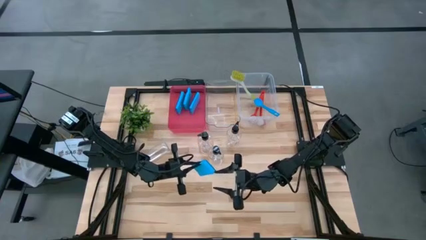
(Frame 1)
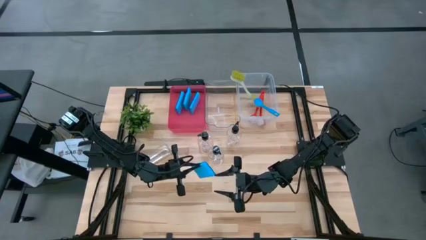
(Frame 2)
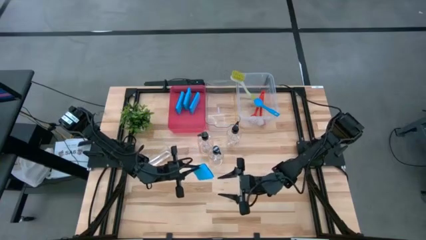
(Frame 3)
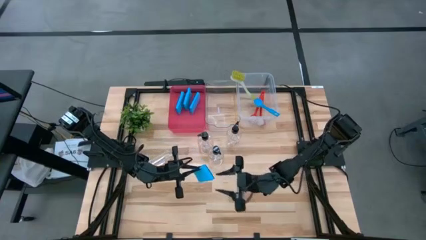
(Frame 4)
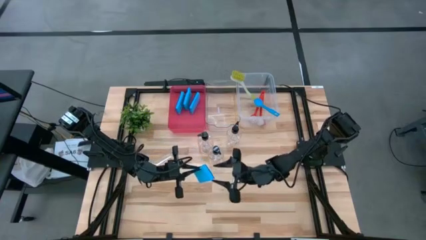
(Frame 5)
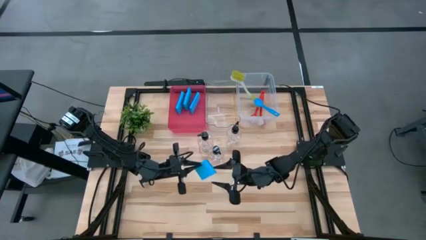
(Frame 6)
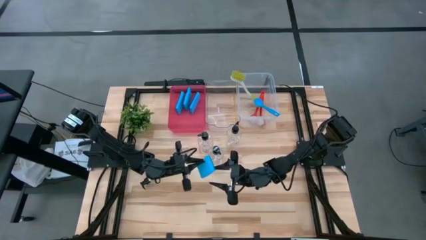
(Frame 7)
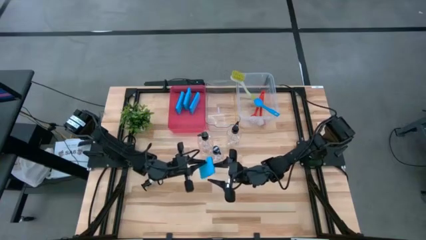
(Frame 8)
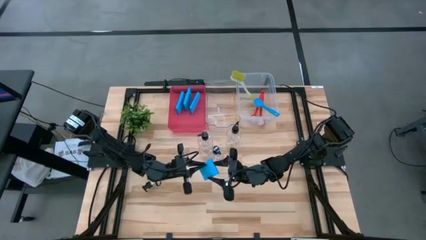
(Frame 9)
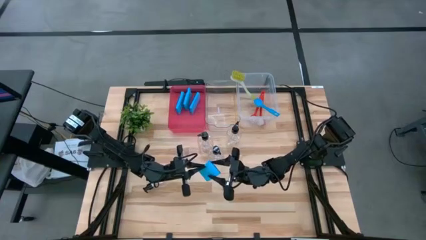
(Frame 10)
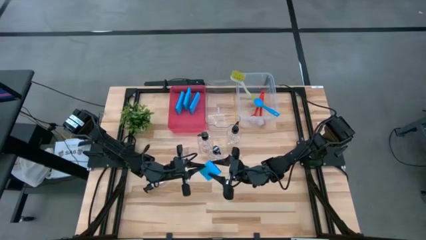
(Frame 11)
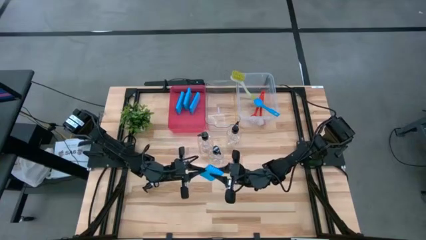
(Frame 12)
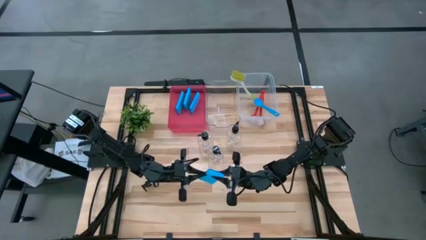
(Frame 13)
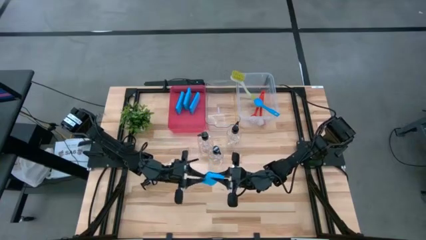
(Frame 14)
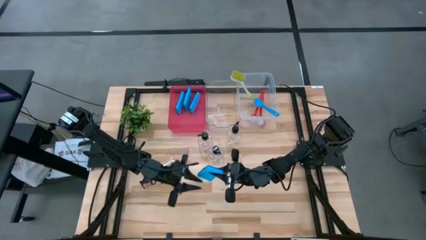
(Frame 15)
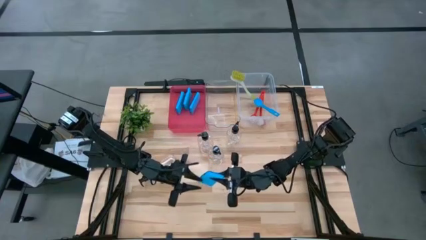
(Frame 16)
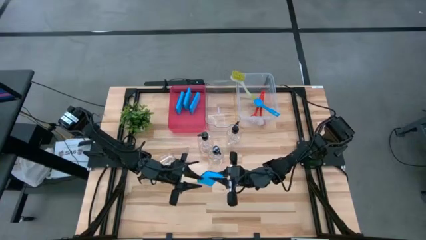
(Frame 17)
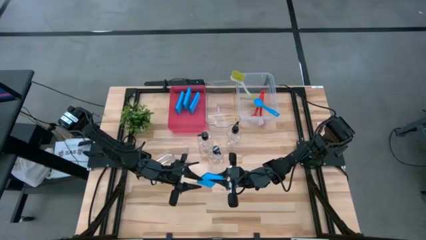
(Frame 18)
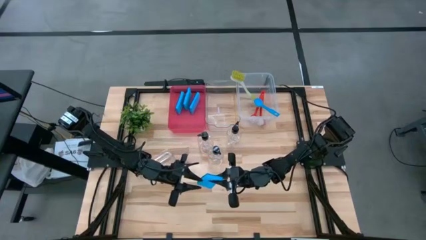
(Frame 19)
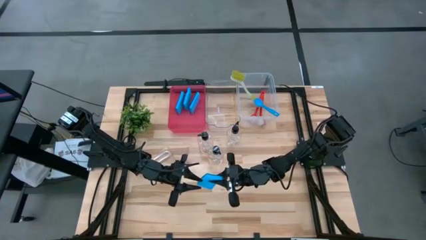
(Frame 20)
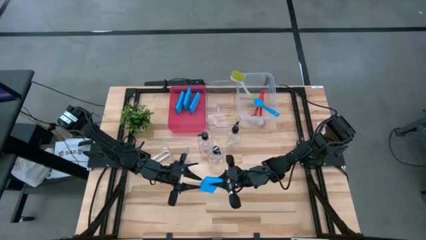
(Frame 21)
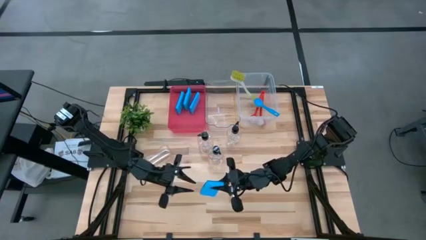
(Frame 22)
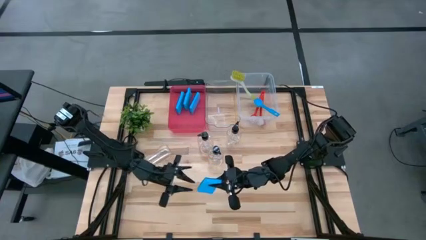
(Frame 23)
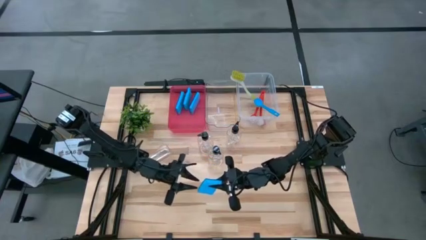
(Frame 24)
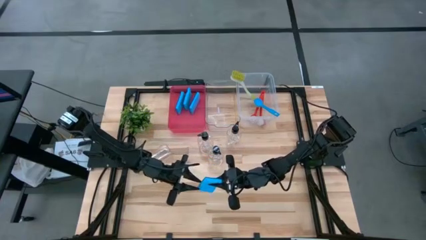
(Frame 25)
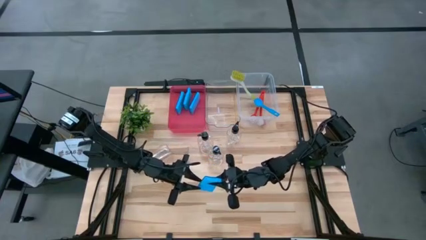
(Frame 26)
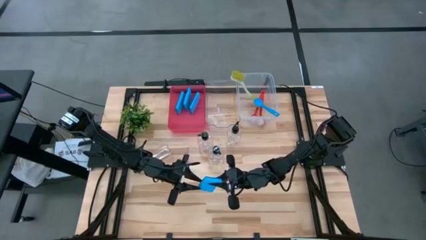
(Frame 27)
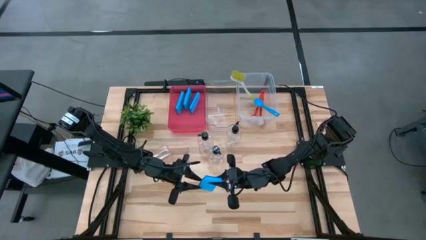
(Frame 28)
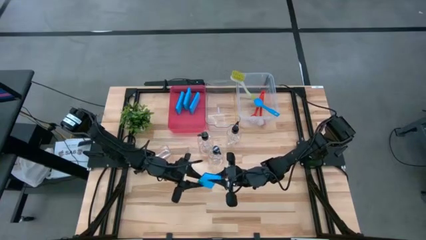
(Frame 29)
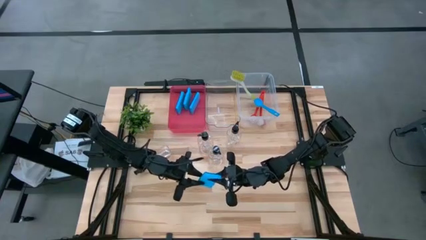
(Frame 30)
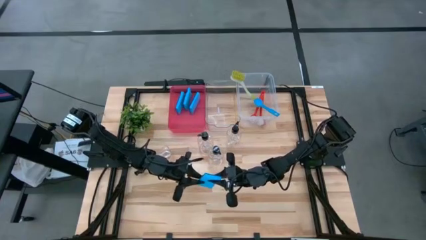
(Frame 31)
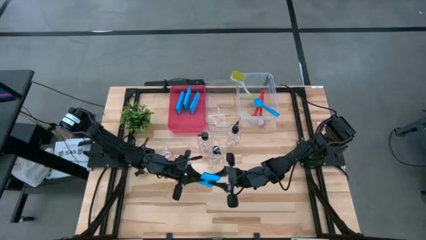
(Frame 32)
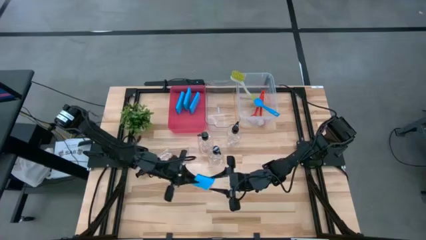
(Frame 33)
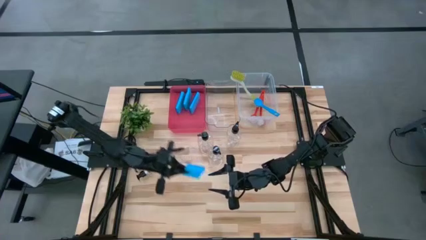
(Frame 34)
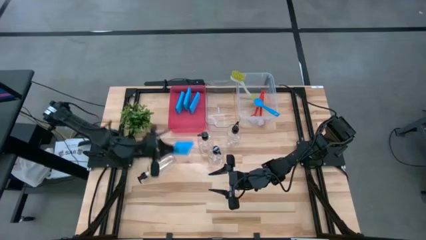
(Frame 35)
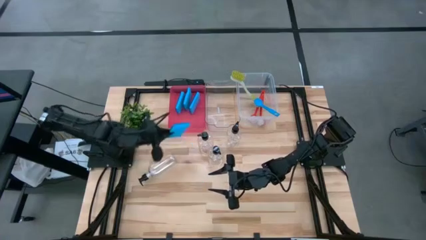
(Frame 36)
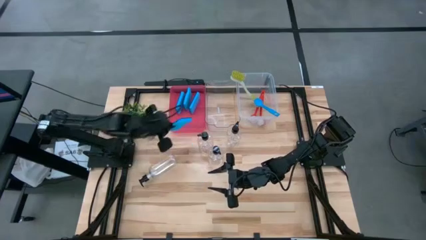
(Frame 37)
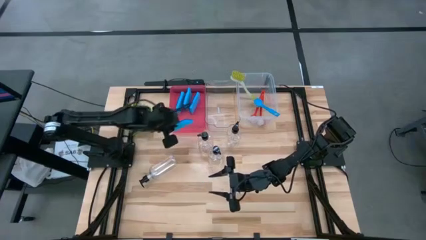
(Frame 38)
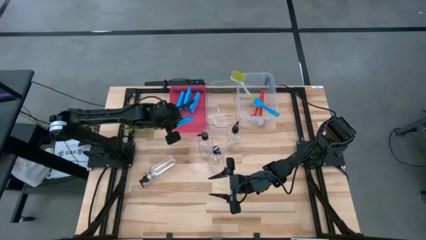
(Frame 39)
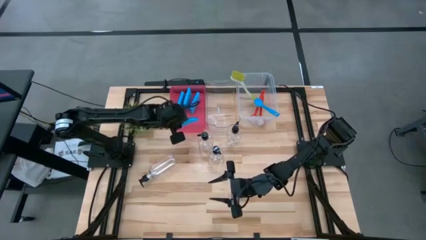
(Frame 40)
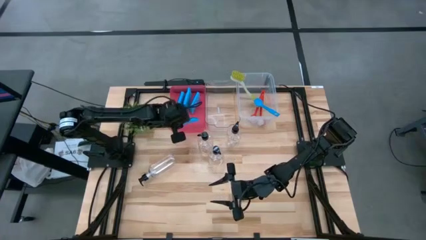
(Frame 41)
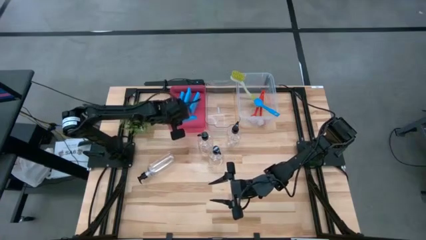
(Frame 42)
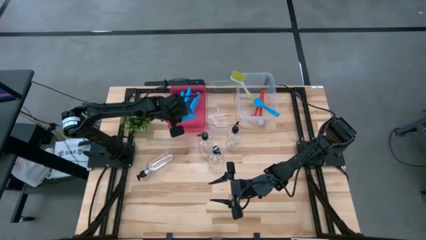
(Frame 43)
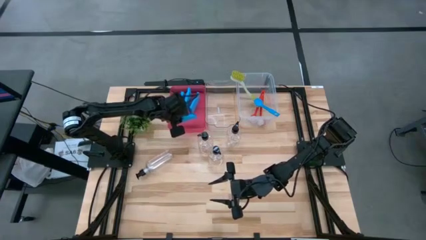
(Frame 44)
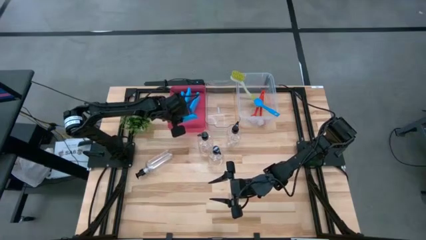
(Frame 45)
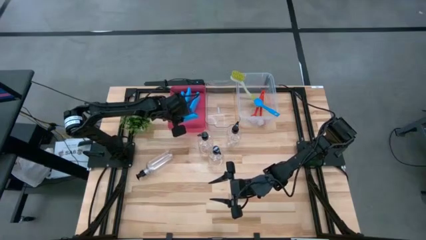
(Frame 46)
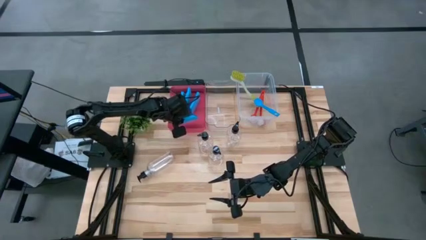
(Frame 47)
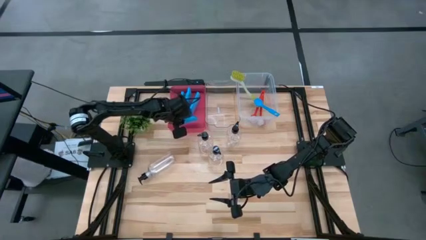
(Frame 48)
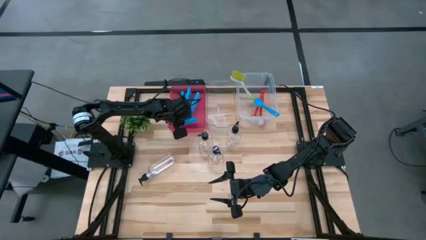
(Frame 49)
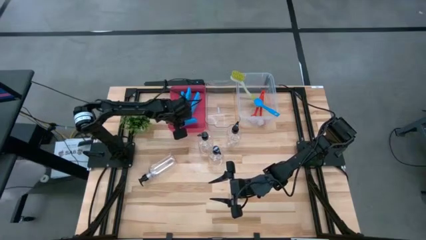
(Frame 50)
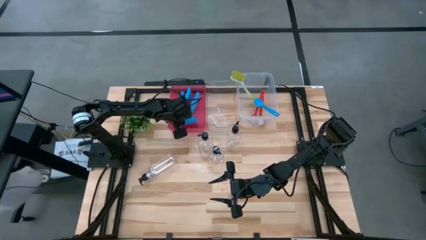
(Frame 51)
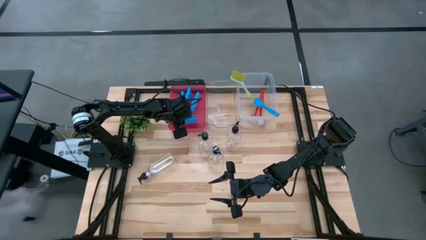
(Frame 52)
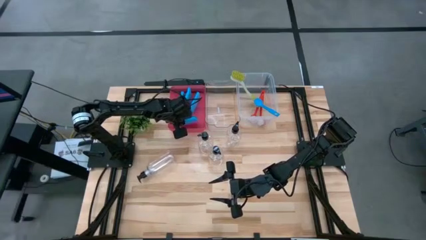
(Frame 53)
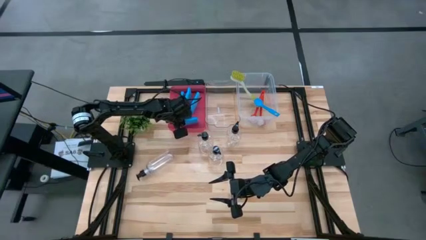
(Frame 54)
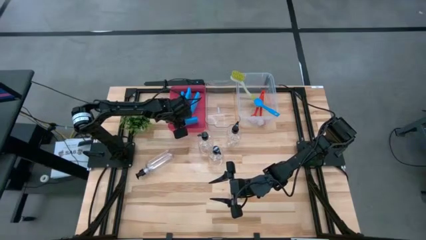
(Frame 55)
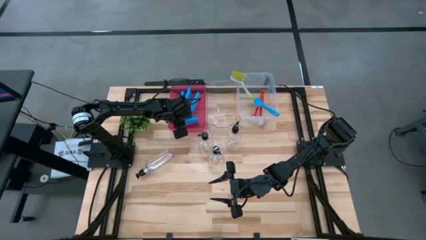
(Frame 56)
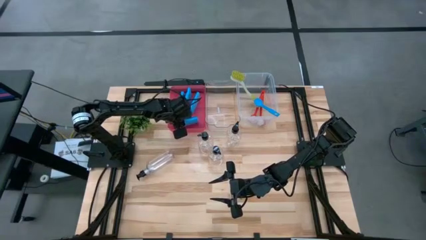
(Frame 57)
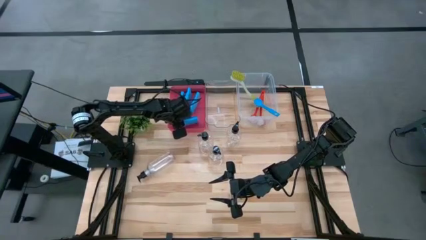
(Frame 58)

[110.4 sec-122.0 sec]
Task: Pick & Place Kitchen Sink Supplies
Put the blue sponge into the red bin

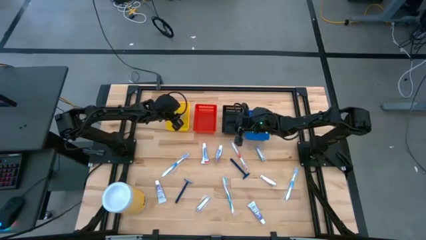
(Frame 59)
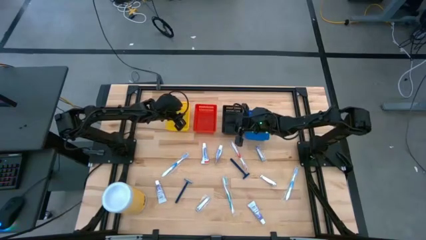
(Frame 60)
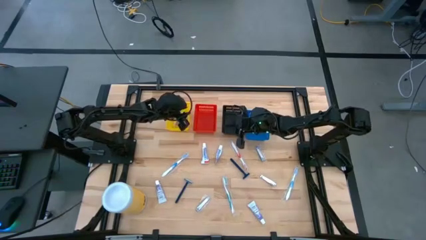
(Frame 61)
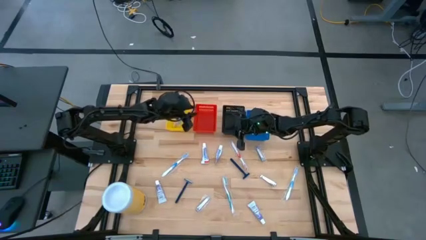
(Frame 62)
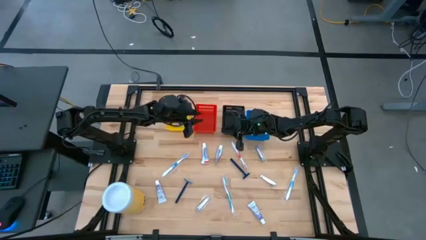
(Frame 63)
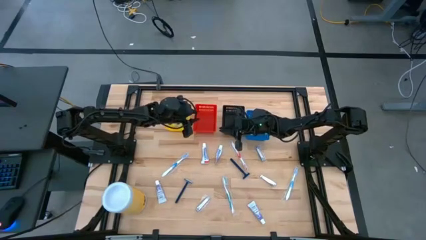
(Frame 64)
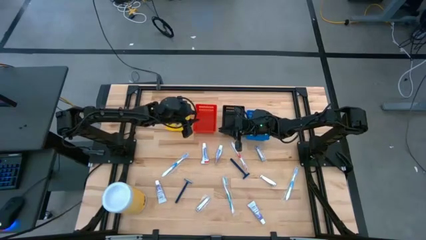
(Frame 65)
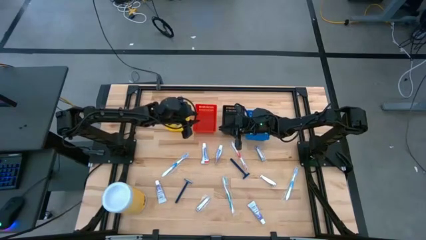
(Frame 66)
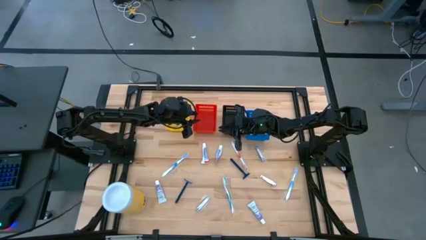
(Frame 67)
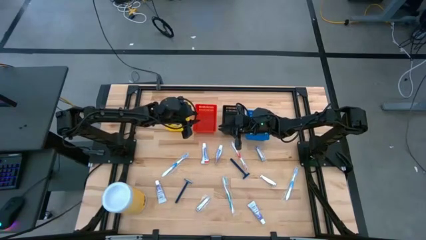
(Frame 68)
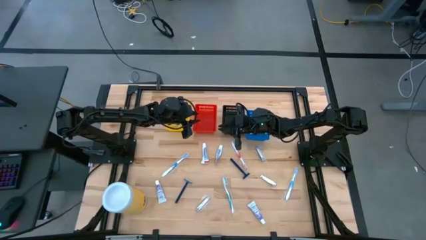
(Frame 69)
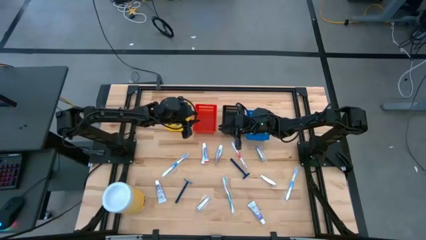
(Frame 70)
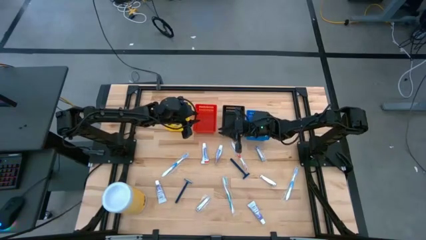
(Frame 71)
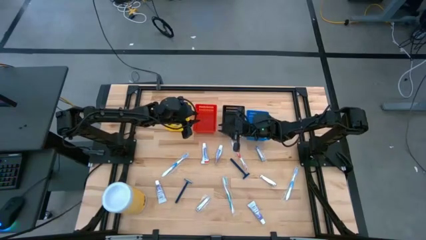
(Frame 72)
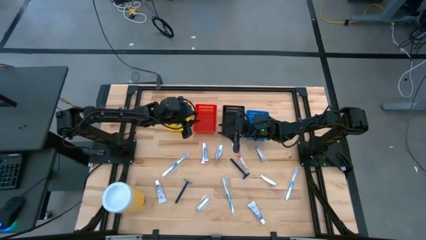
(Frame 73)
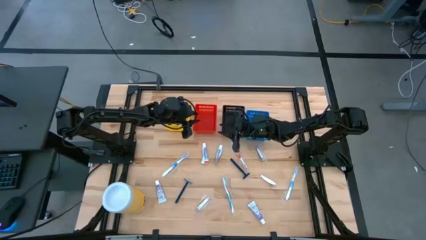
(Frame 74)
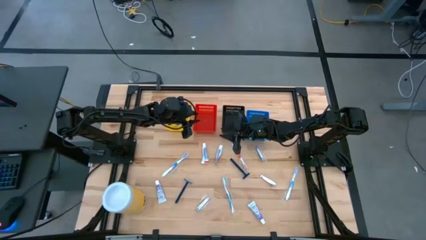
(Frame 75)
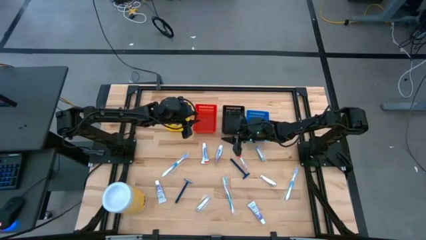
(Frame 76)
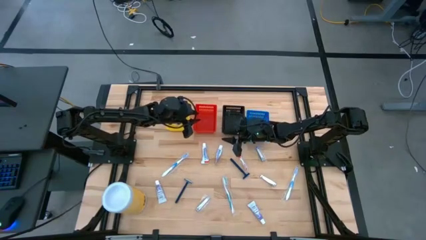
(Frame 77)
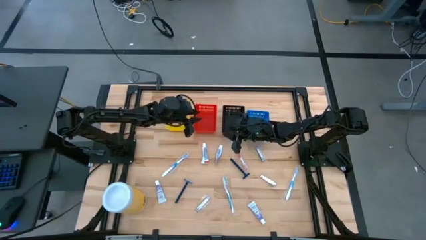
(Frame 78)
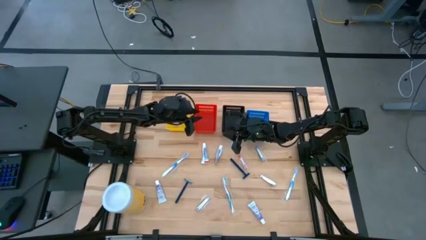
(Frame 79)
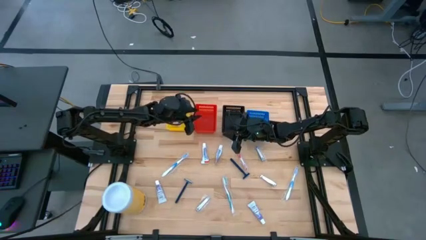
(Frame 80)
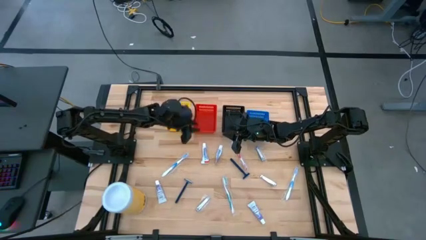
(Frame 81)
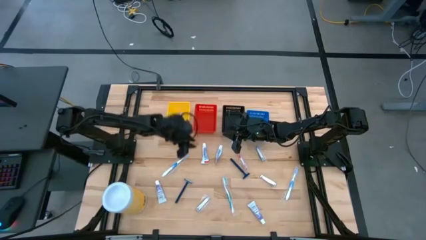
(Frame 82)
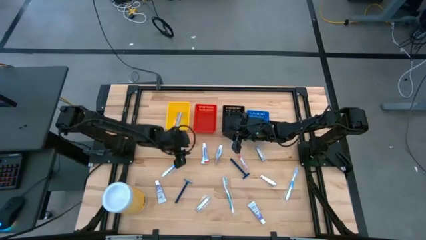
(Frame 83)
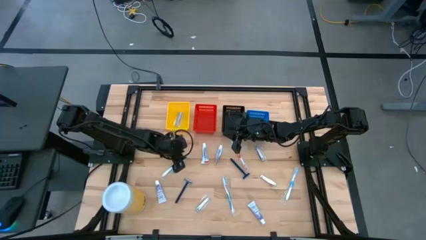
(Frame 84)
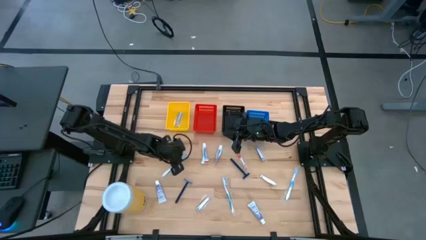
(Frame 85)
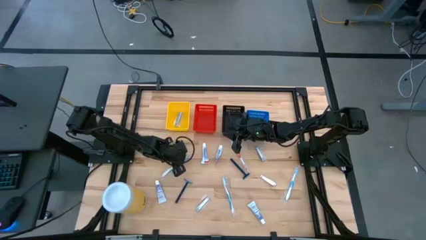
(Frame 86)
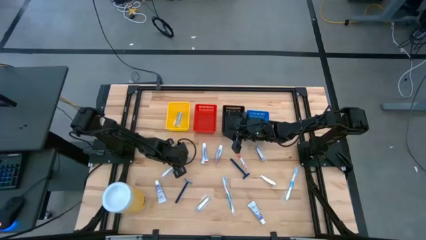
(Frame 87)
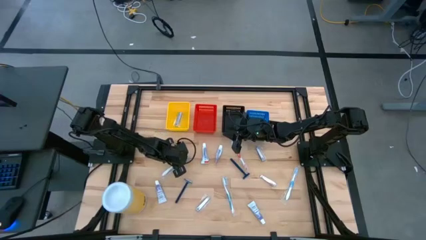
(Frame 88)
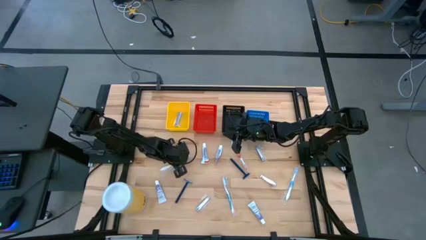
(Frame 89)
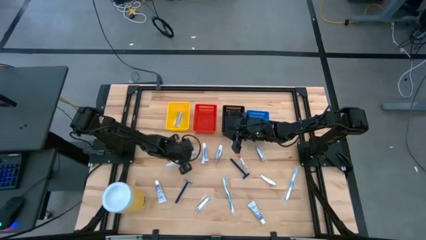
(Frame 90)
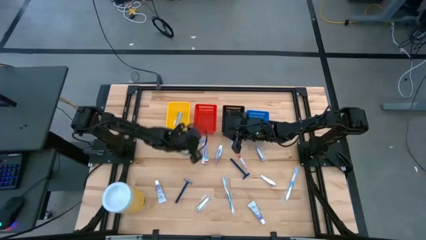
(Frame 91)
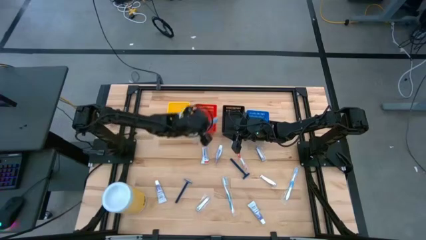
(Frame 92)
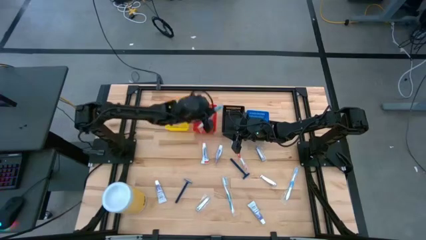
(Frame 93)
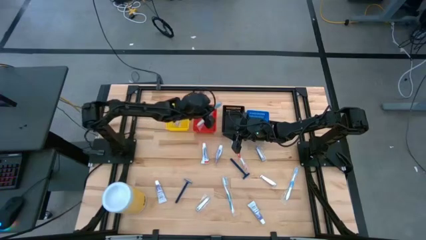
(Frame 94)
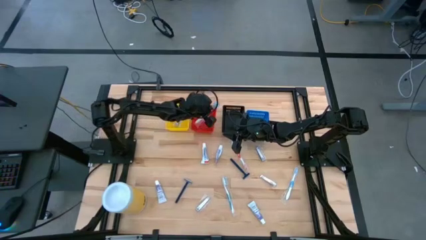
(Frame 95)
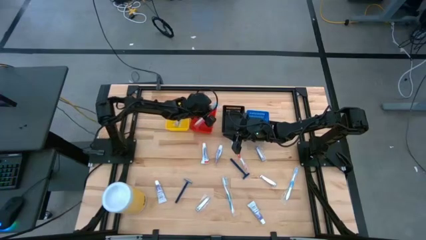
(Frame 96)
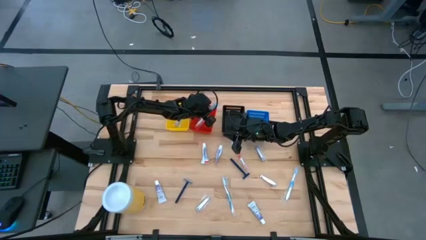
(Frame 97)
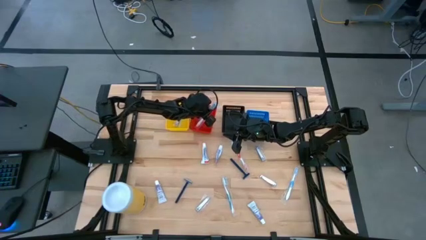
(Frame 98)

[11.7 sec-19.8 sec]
Task: Pick & Place Travel size toiletries
Put the blue toothbrush into the red bin
